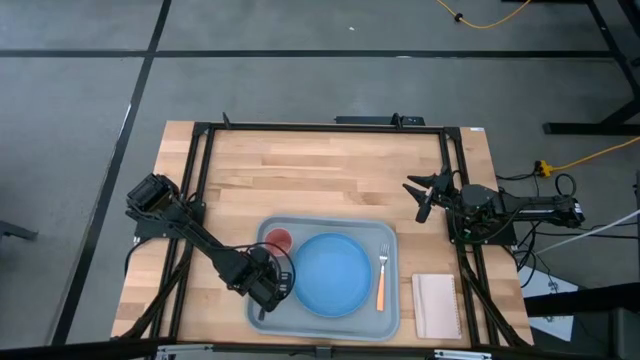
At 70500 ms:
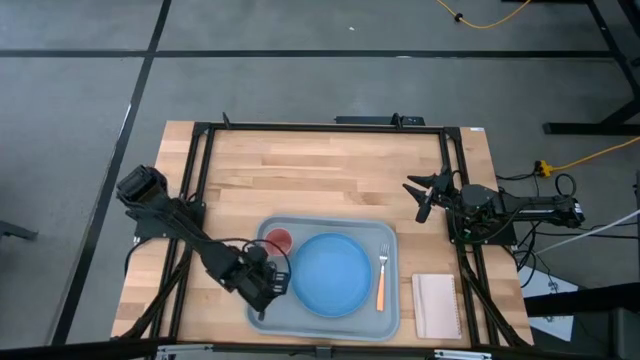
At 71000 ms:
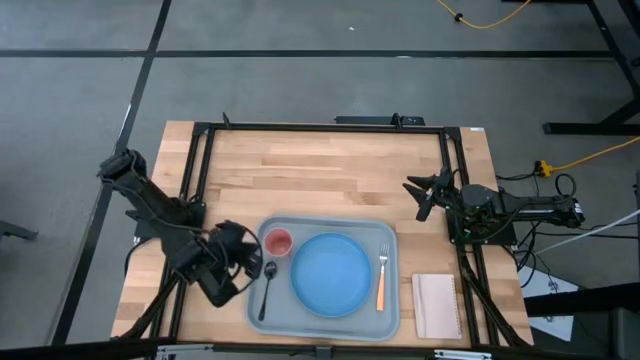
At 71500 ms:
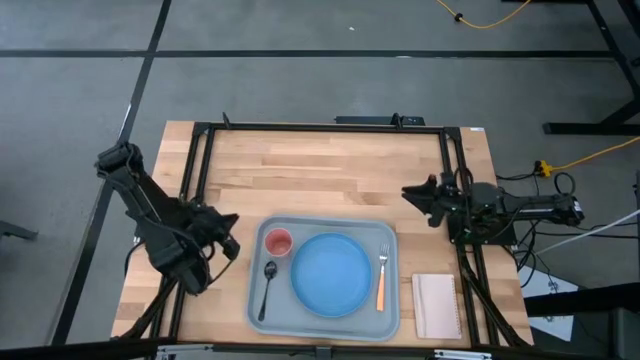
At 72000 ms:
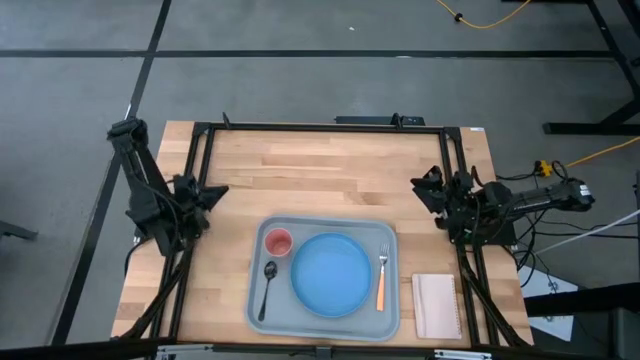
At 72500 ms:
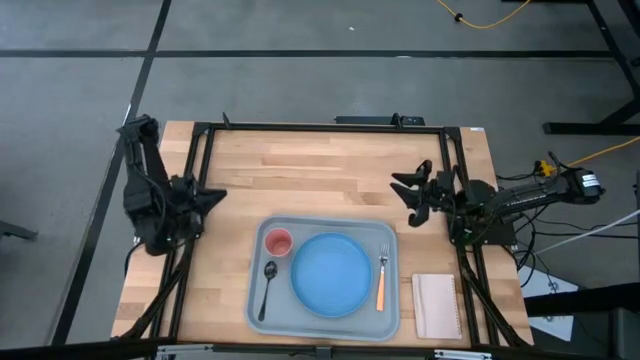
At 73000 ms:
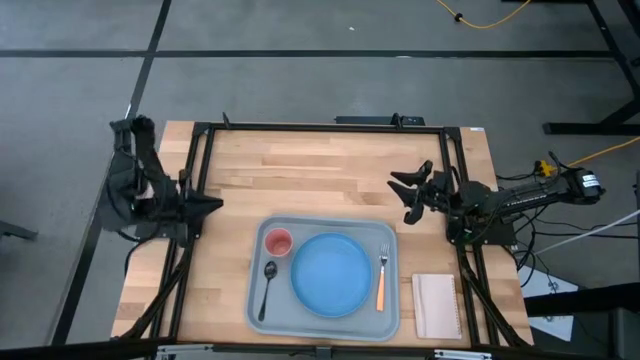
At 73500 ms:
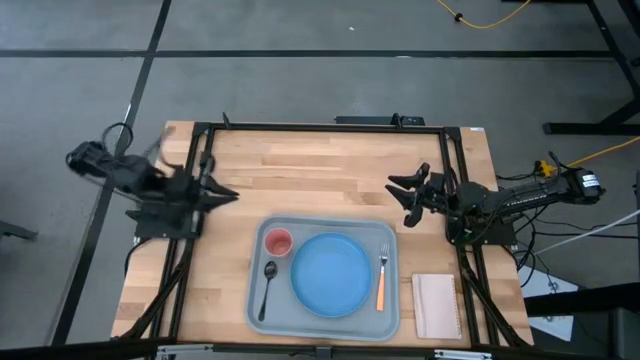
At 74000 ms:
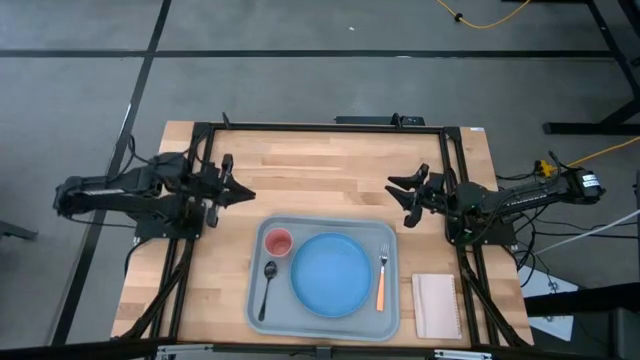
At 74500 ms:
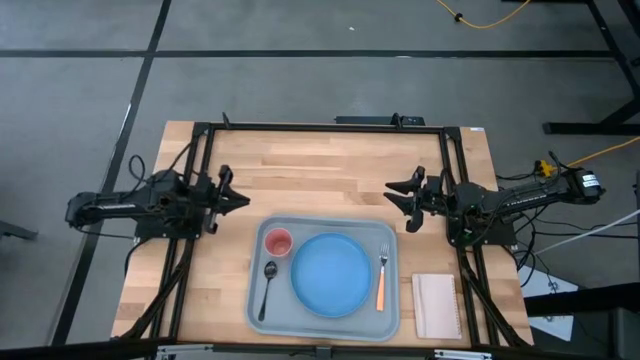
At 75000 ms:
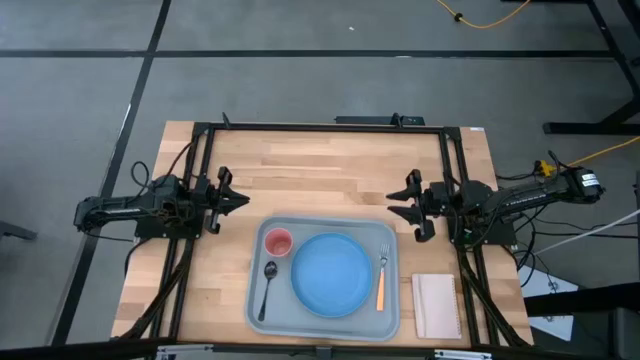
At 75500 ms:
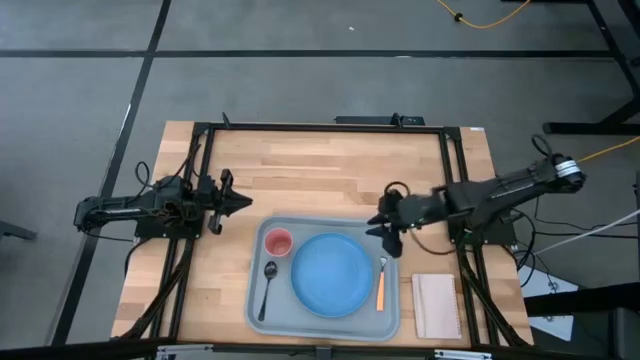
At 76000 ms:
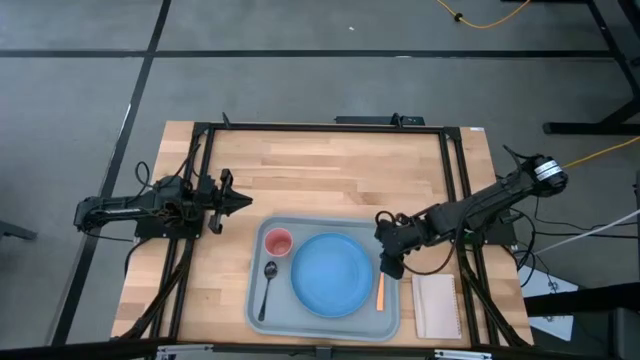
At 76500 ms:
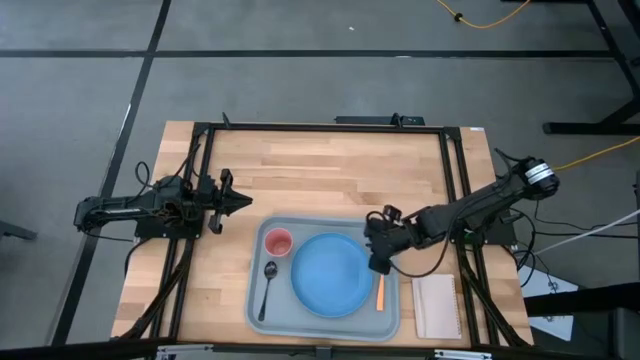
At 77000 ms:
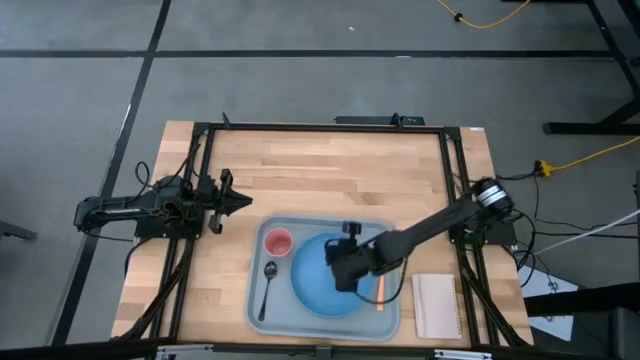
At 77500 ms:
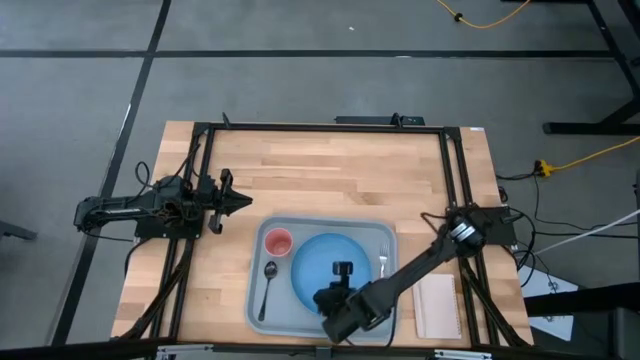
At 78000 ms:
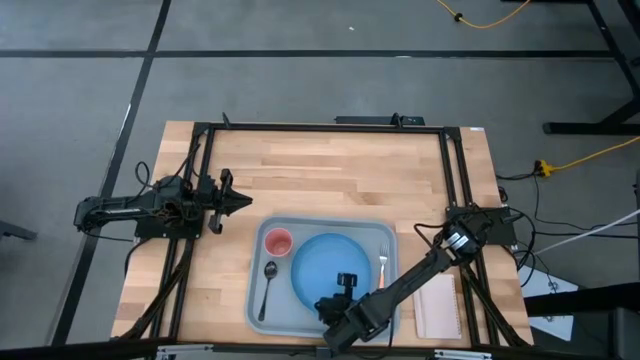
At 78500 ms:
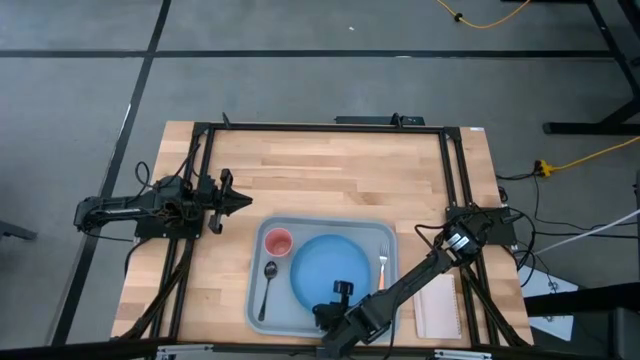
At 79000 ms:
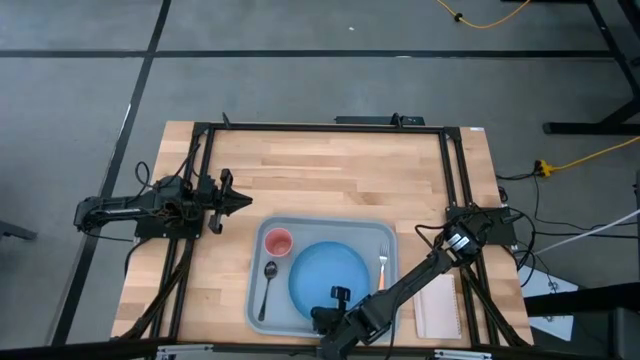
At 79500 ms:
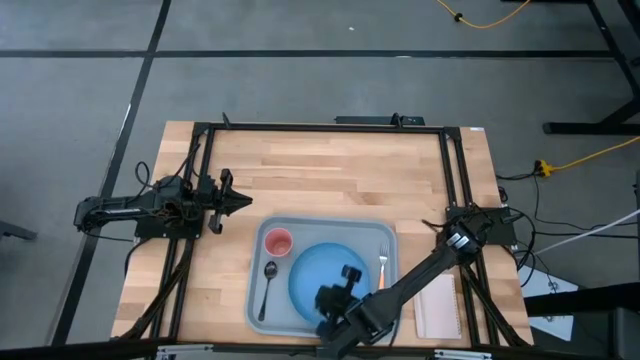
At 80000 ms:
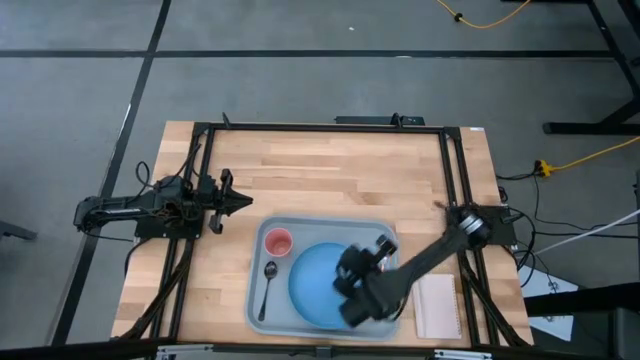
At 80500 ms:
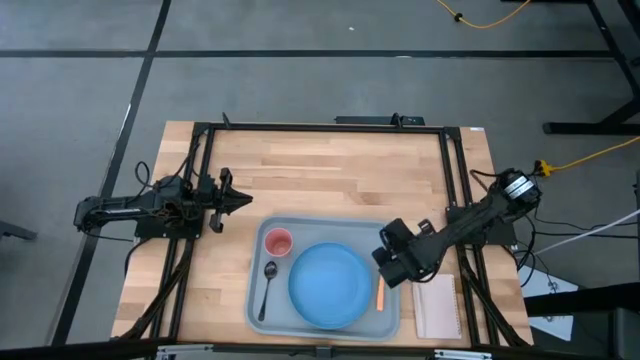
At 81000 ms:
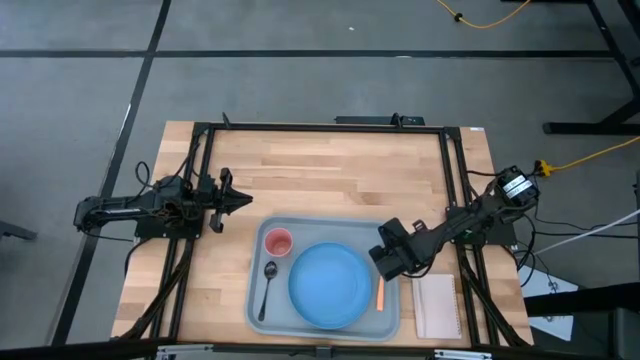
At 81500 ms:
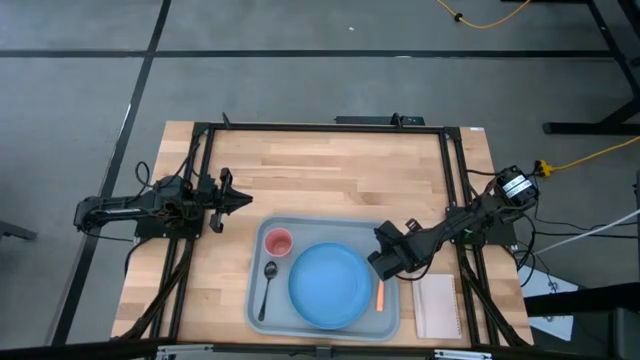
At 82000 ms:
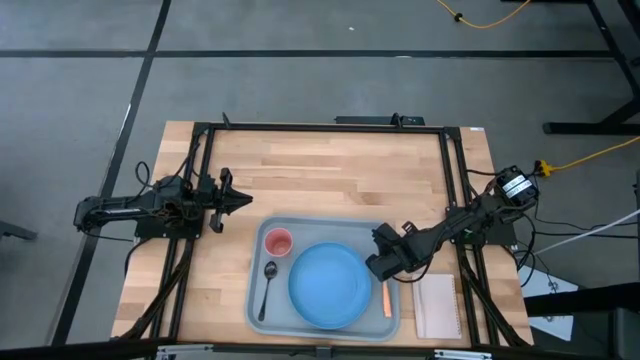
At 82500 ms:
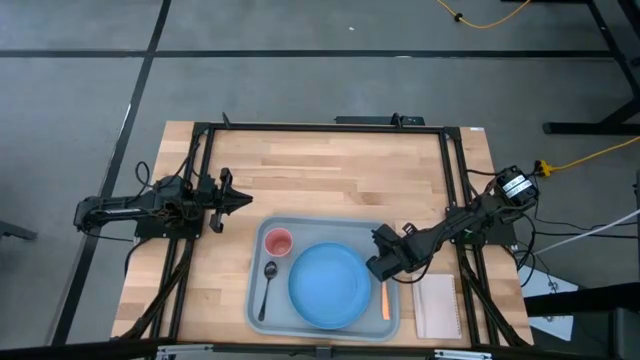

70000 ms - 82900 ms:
Task: Pick and place plate/cup/fork/spoon on tray
Adjust the utensils on the gray tray

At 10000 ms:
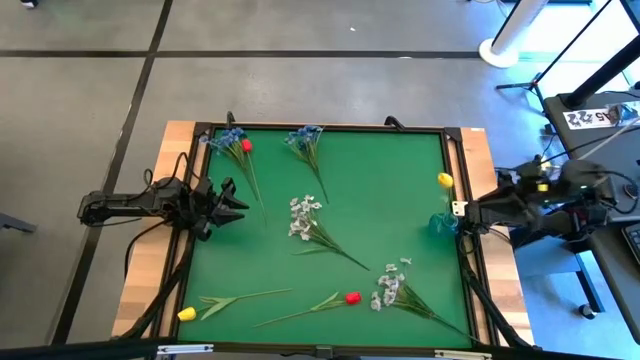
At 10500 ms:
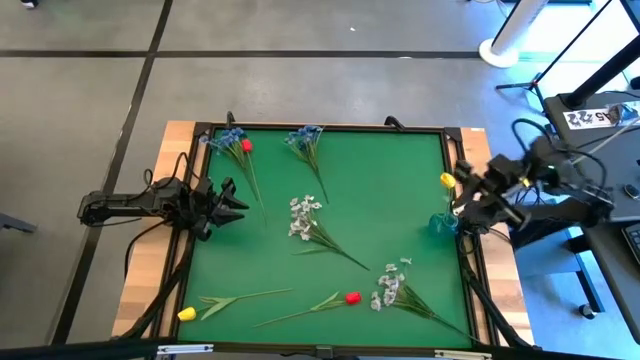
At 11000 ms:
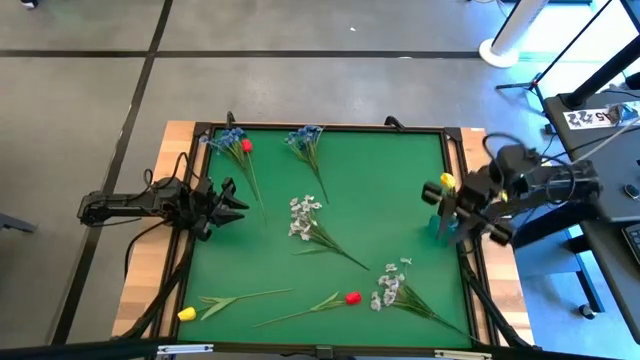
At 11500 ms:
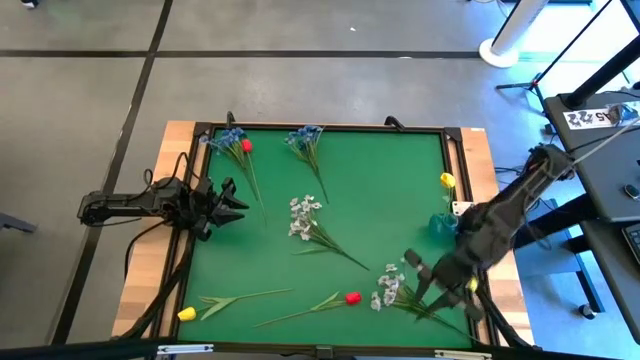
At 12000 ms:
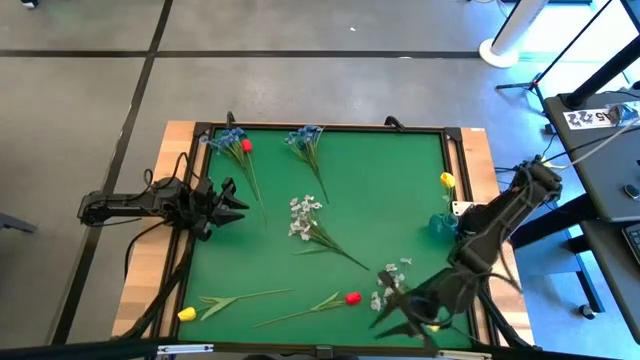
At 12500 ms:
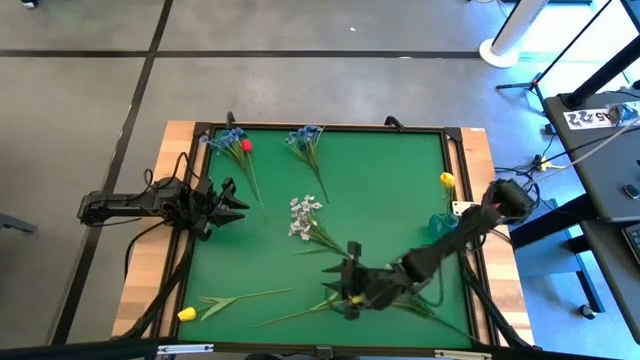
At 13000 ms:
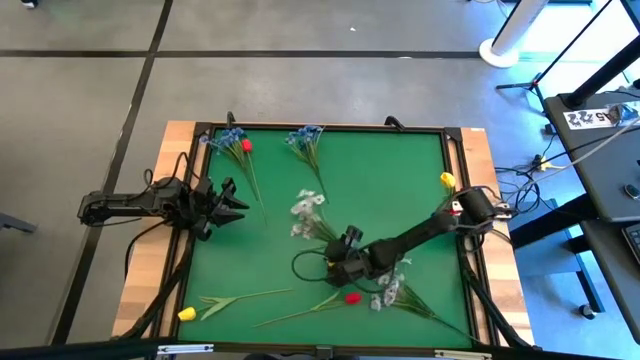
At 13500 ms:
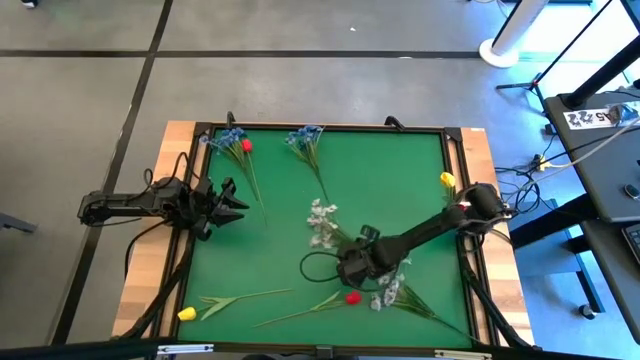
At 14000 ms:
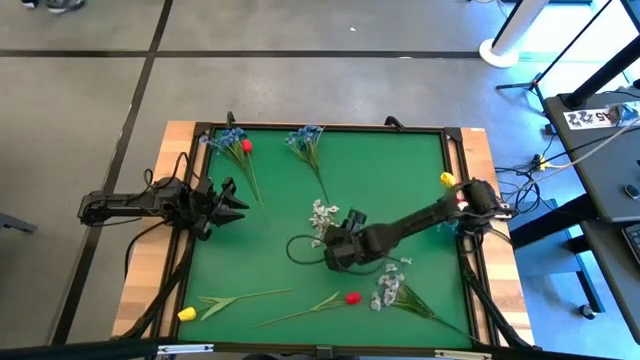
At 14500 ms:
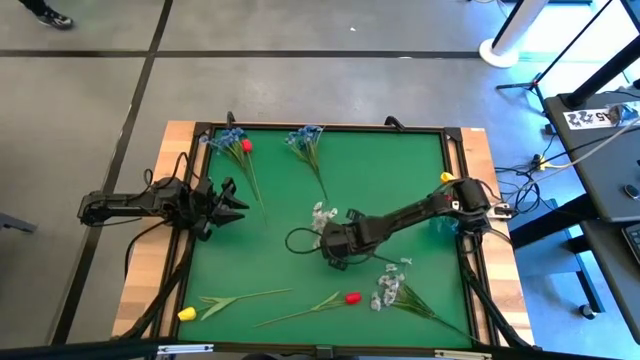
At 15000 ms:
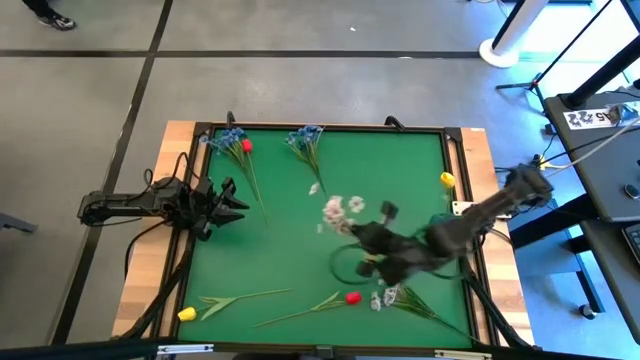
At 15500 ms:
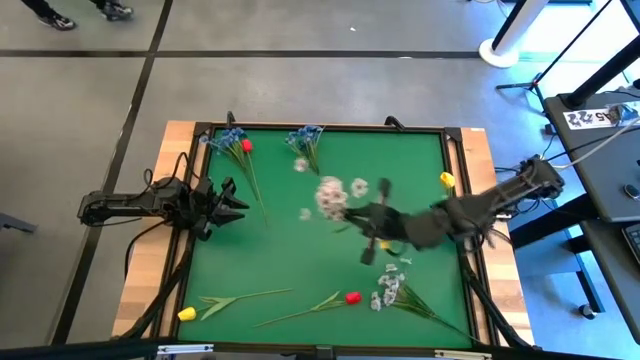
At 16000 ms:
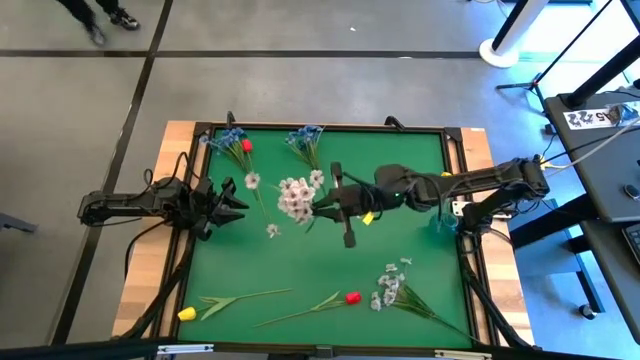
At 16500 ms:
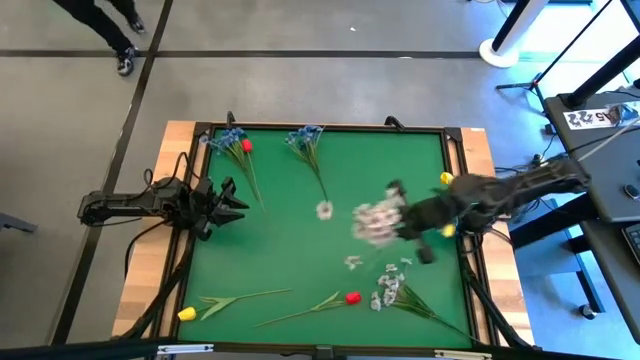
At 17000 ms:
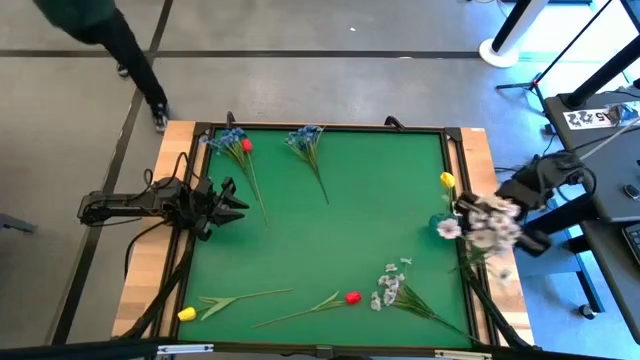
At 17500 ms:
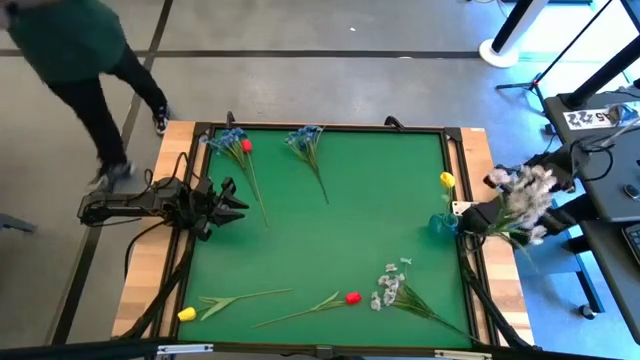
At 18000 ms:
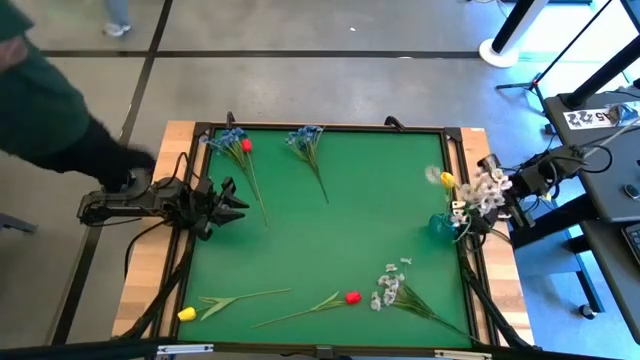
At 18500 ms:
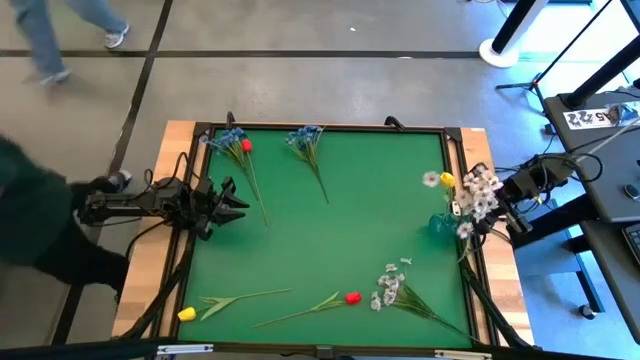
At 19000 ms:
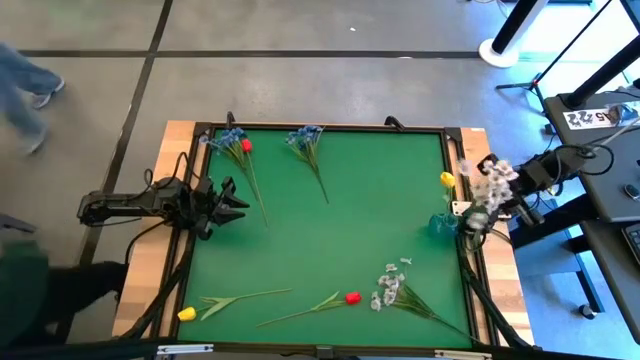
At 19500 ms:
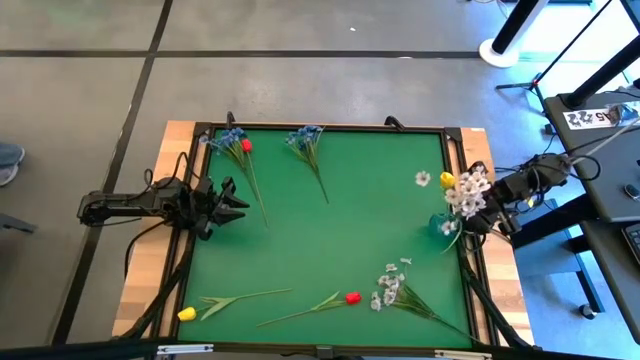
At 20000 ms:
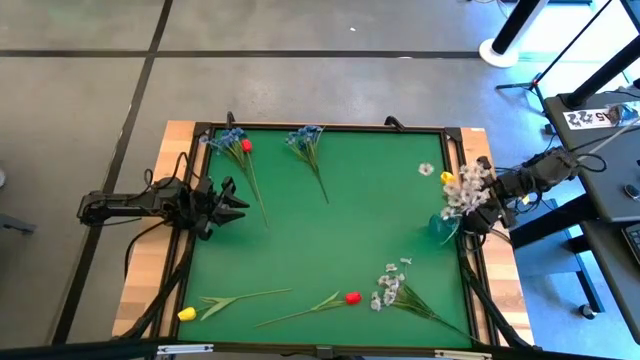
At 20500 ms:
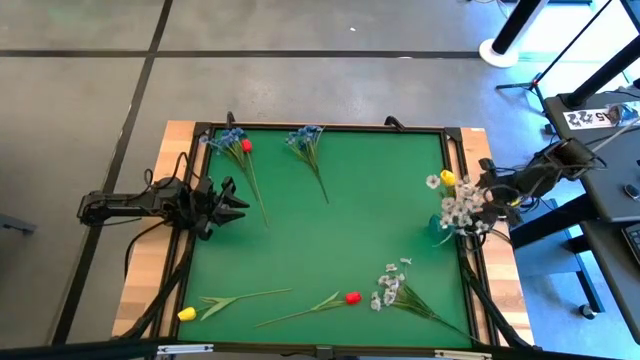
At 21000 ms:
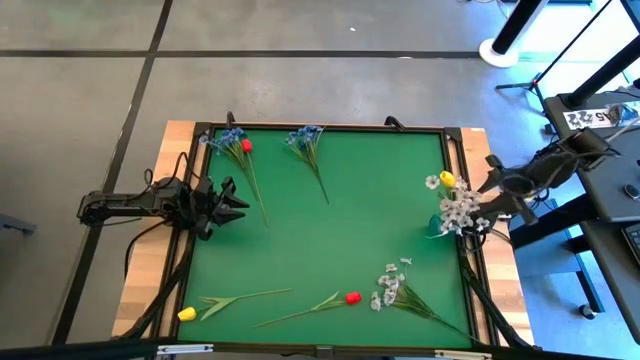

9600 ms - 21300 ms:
Task: Sort flowers into vase by color
Put the top white flower into the blue vase
